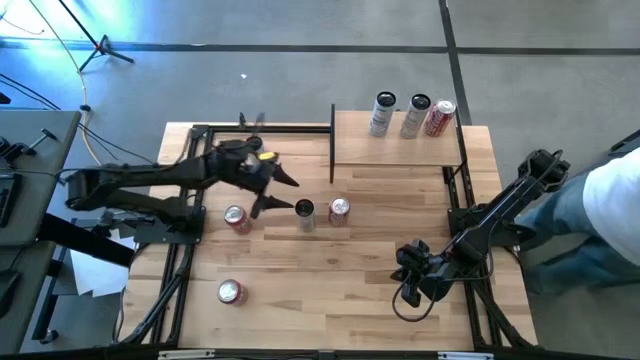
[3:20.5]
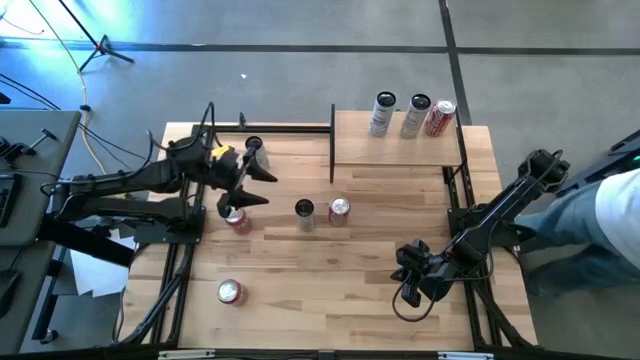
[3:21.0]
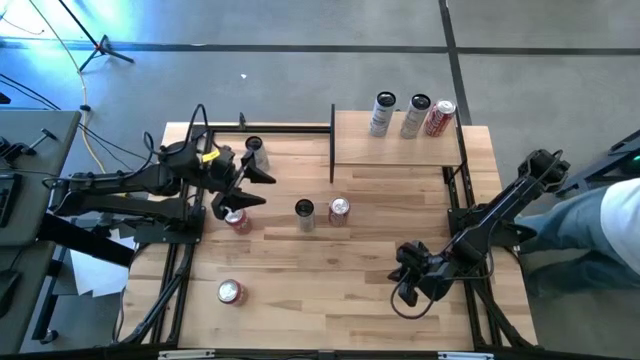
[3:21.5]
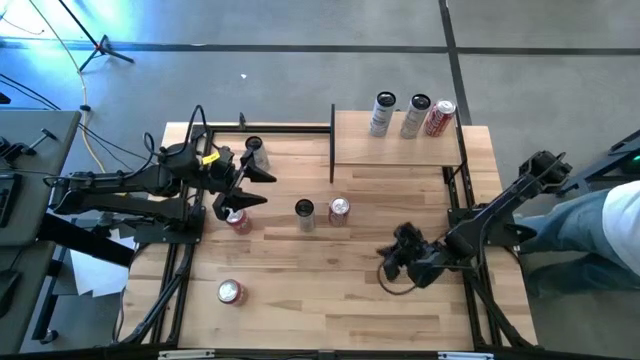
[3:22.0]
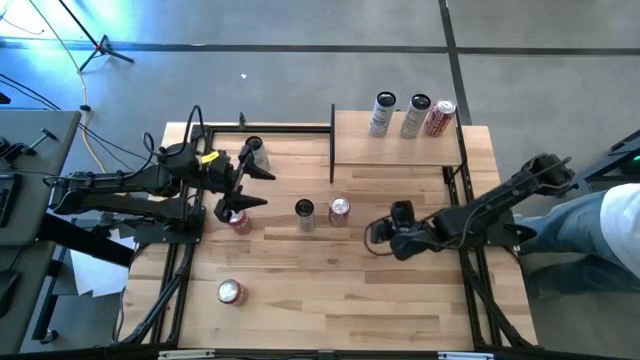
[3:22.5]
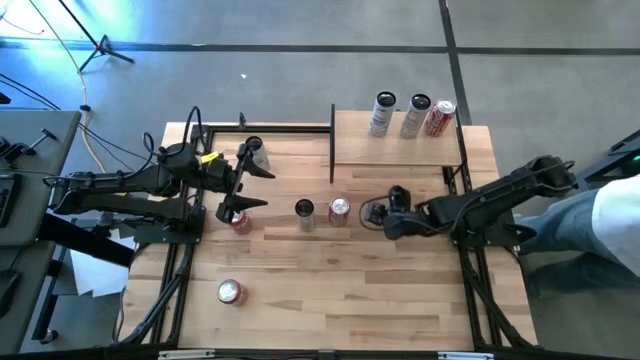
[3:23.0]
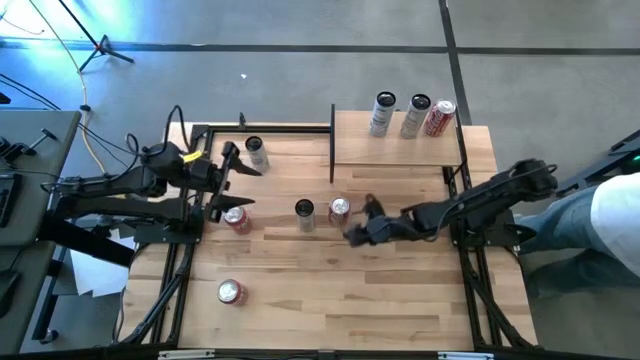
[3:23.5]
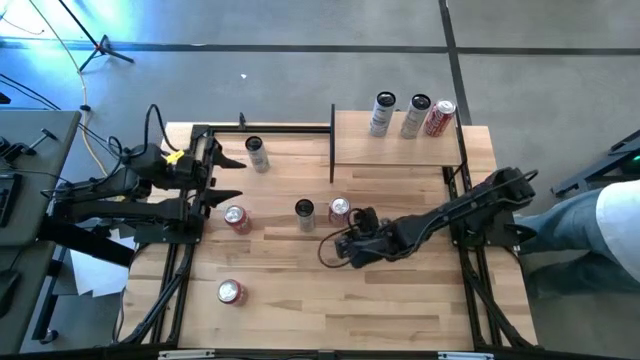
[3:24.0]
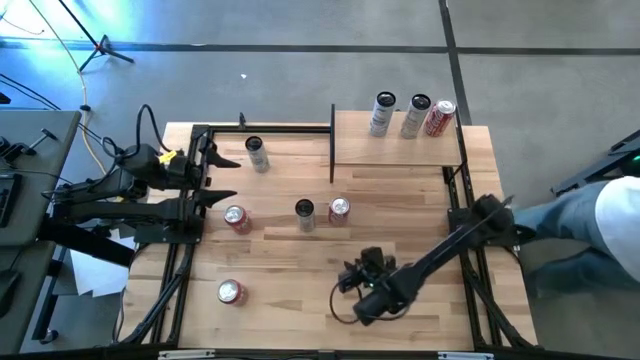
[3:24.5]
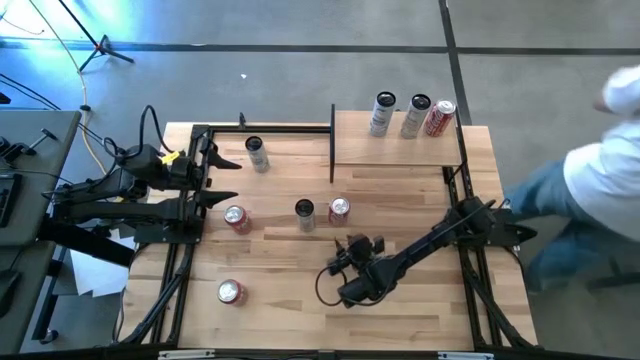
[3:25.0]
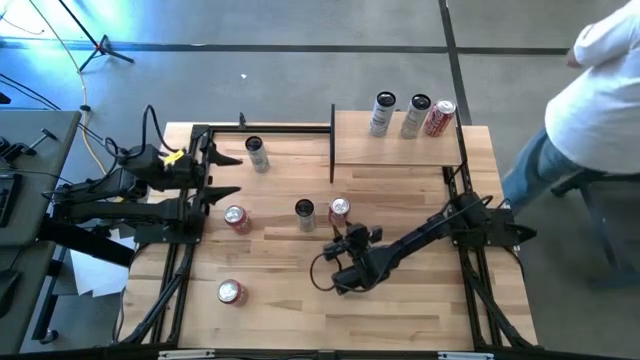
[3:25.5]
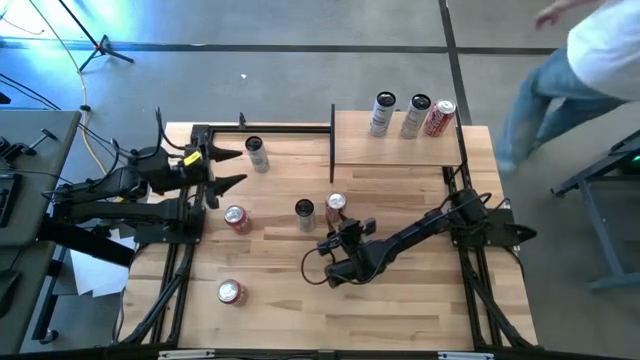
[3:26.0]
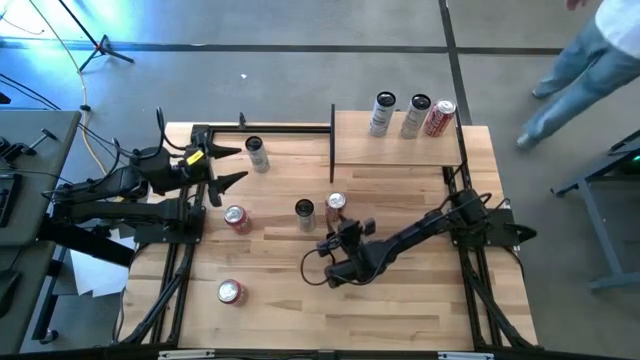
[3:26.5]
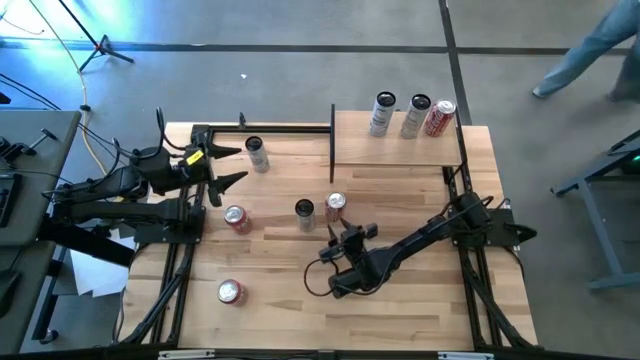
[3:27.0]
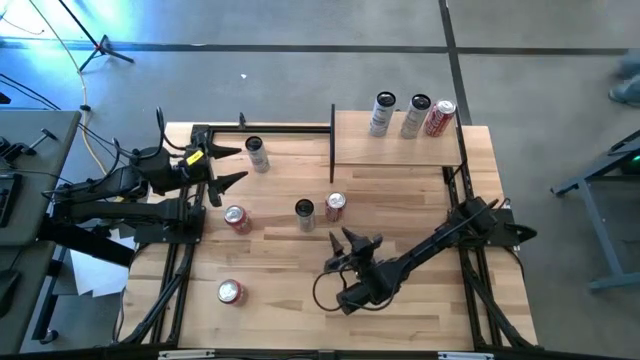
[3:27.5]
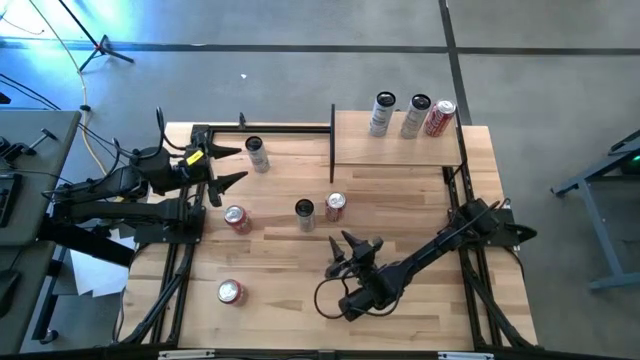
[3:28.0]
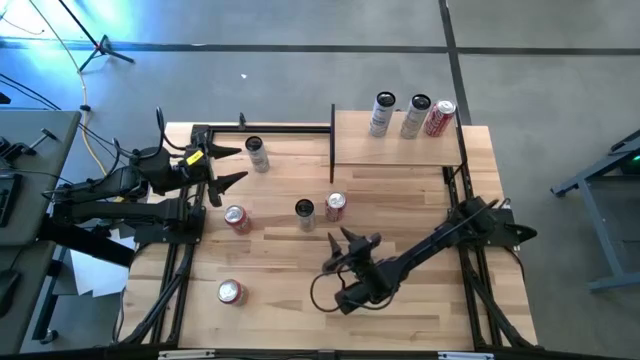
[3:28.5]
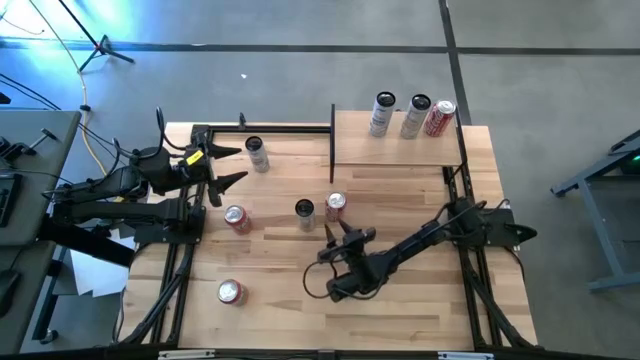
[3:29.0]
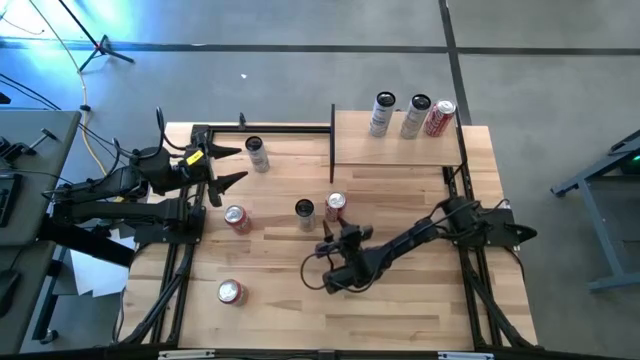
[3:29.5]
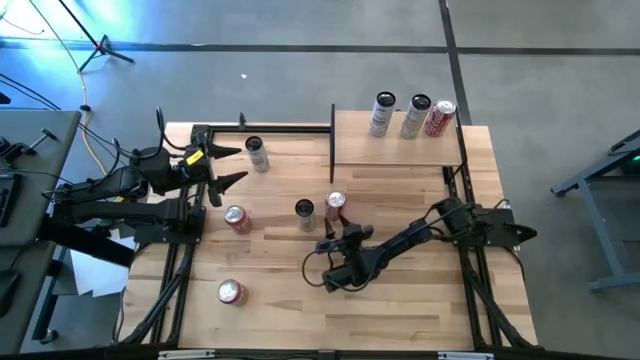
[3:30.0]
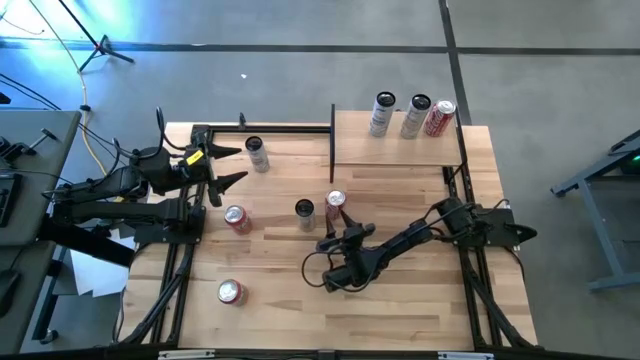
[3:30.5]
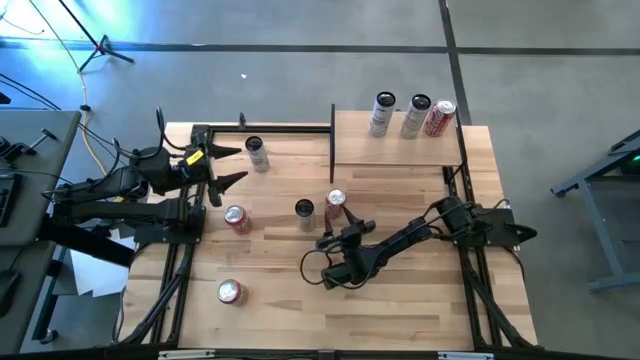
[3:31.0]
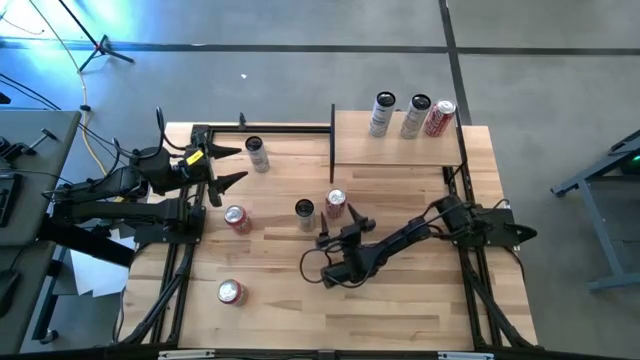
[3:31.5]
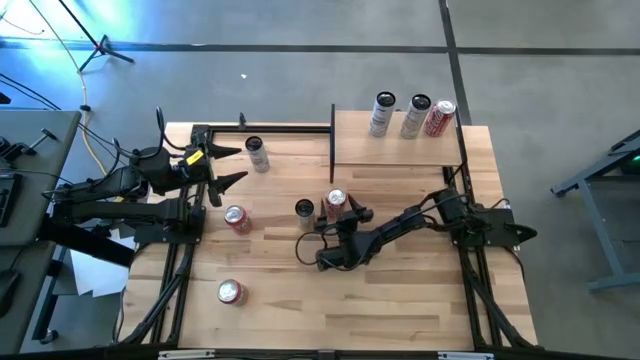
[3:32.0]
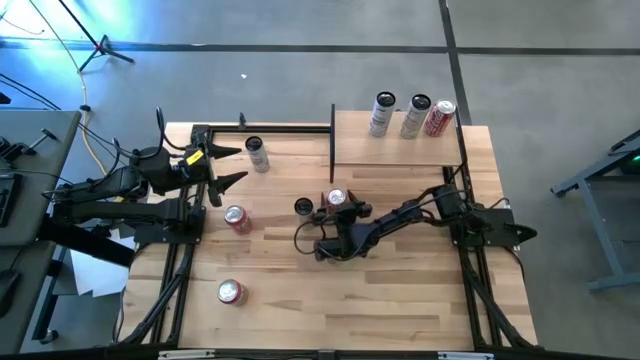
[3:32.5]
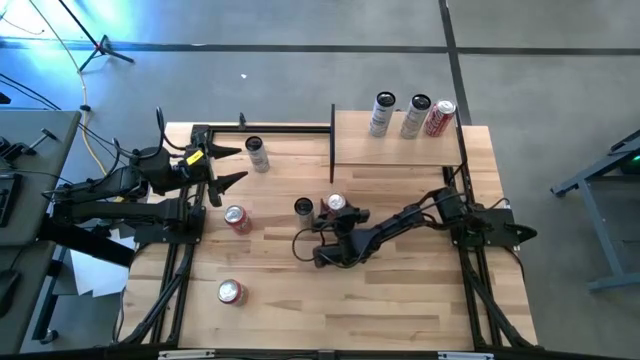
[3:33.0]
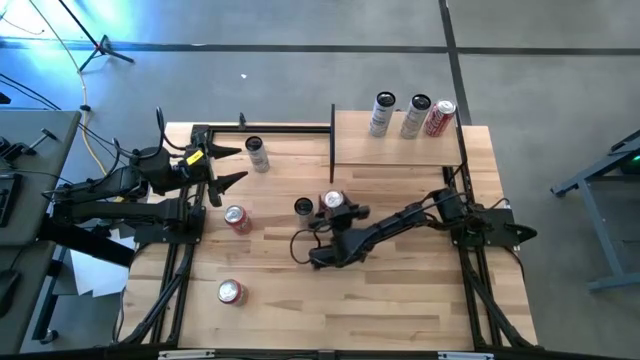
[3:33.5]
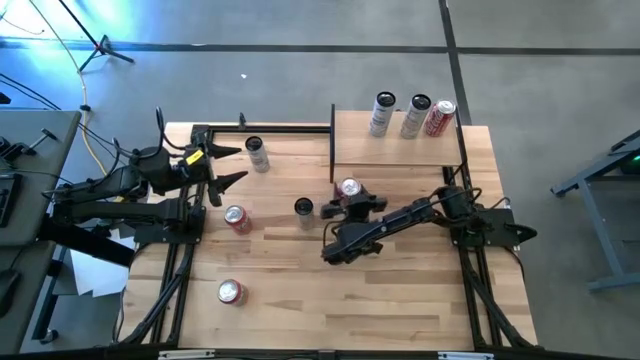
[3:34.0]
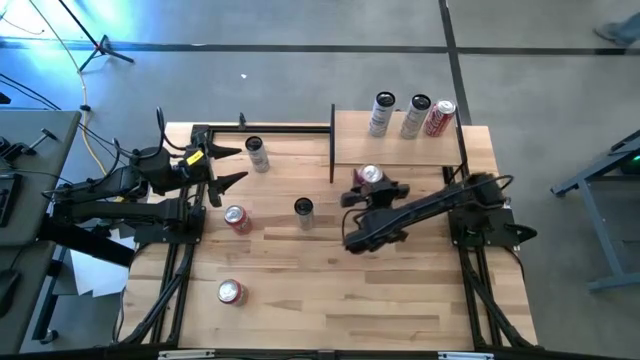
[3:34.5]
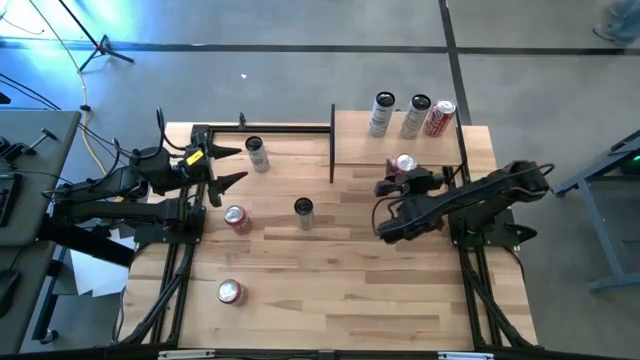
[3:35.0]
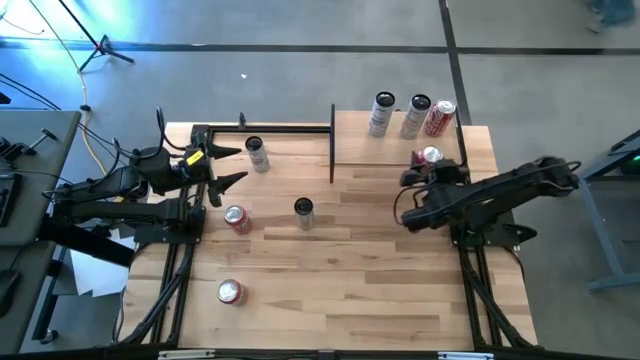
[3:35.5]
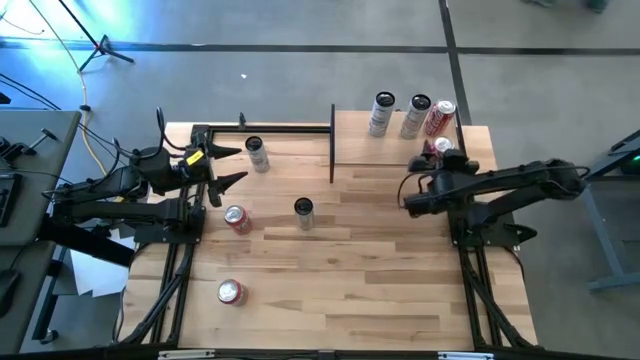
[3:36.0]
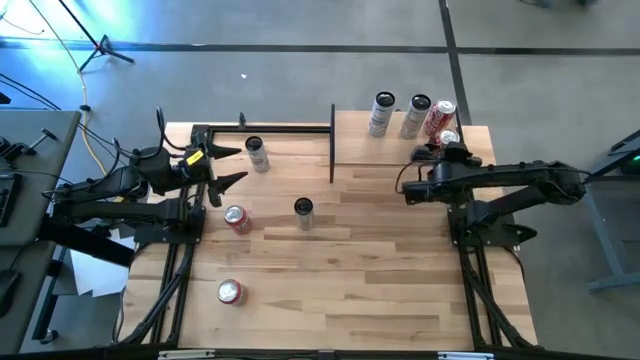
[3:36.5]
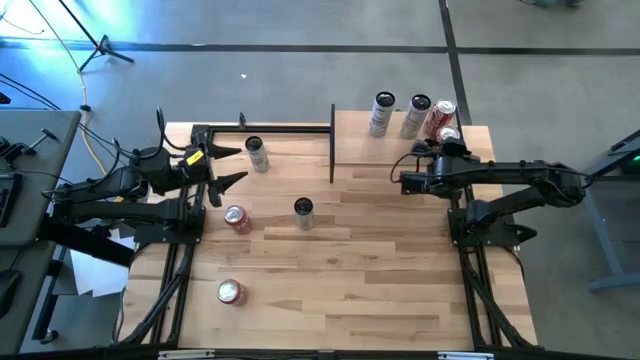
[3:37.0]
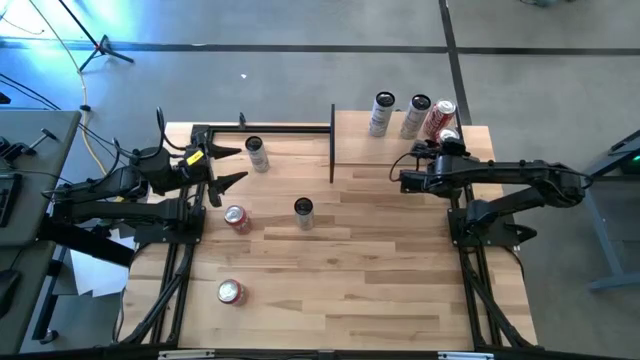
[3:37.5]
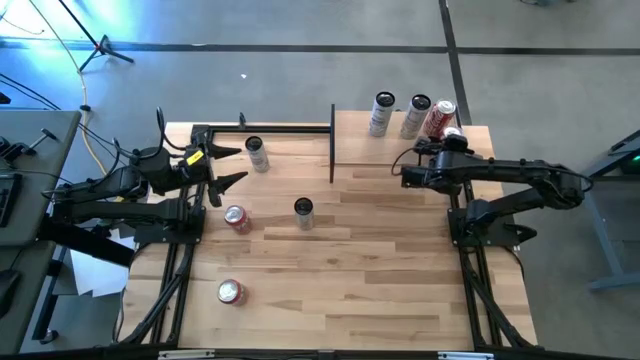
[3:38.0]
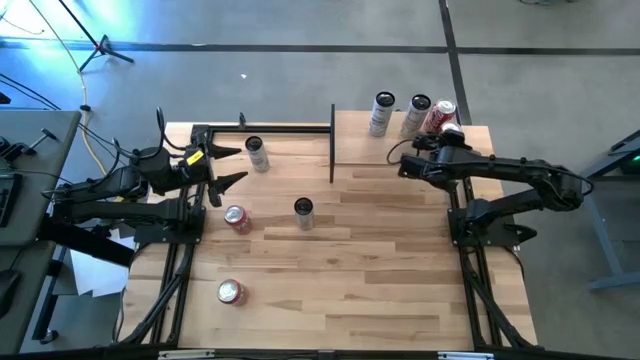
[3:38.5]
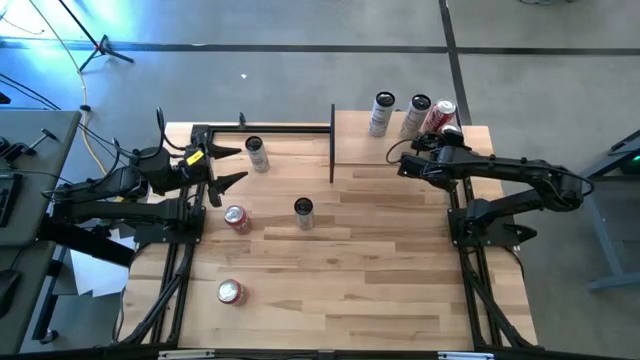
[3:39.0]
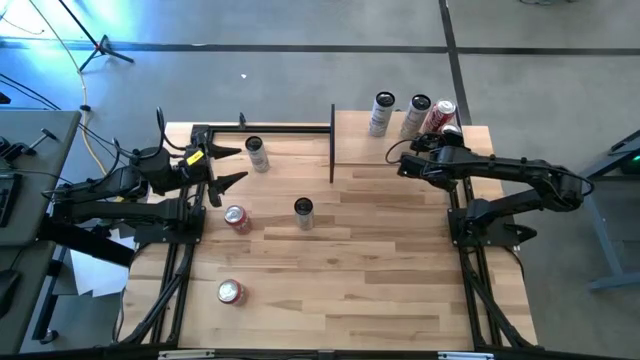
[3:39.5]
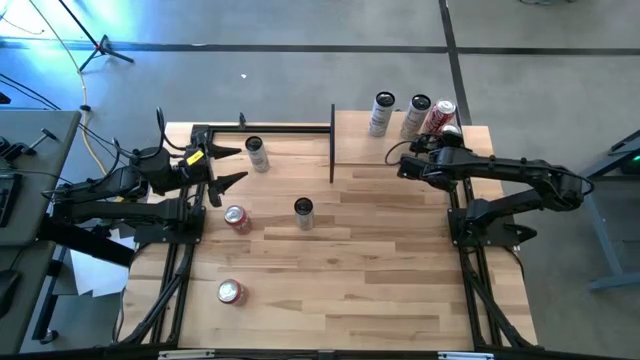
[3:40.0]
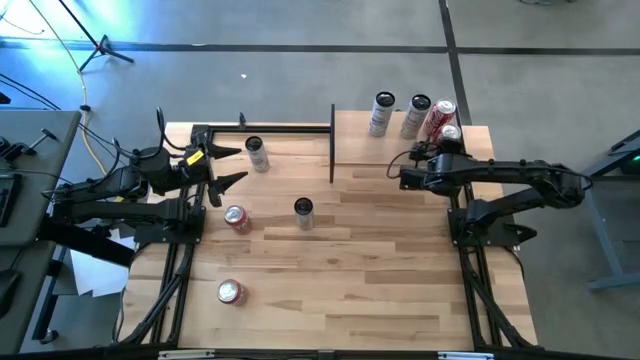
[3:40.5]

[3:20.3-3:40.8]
Task: Place canned beverage on shelf
Put the red soda can on the shelf aligned with the other red soda can

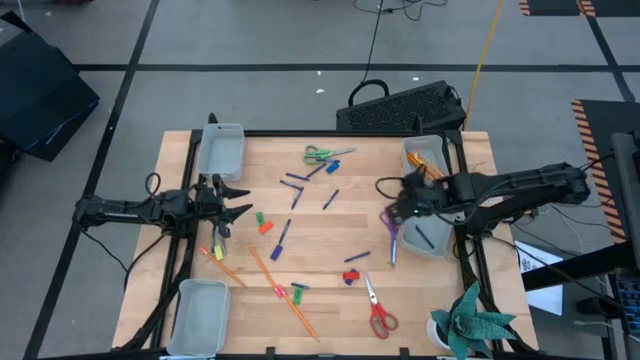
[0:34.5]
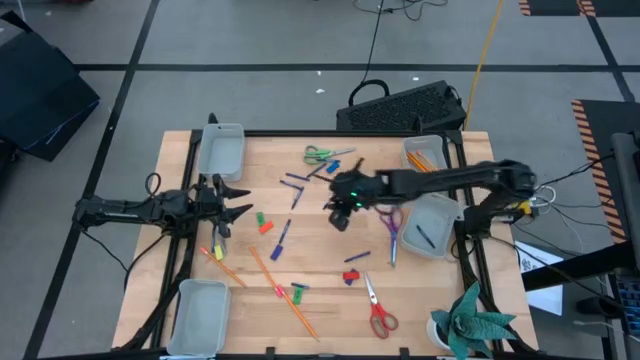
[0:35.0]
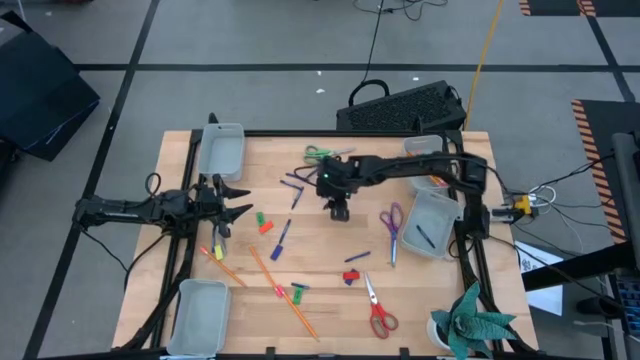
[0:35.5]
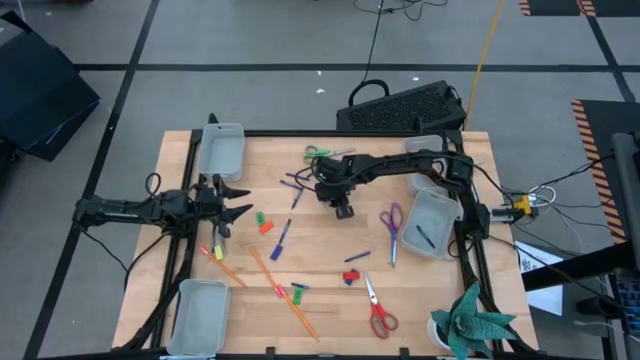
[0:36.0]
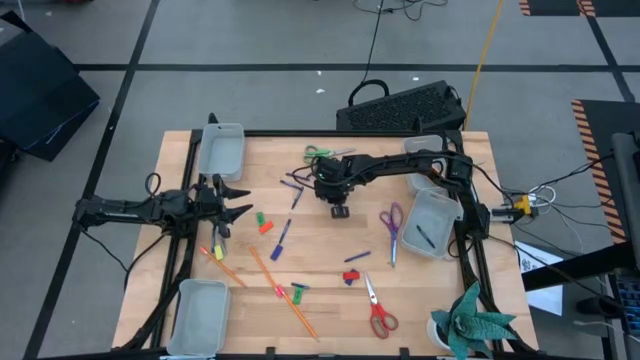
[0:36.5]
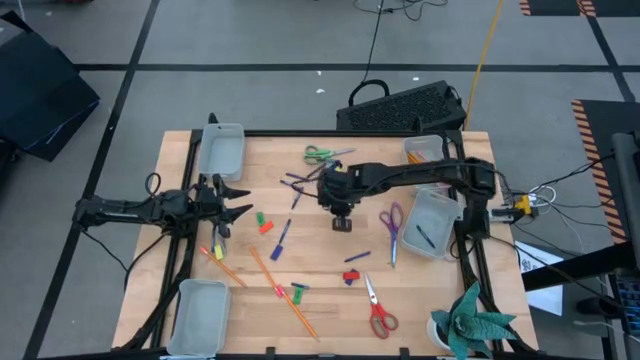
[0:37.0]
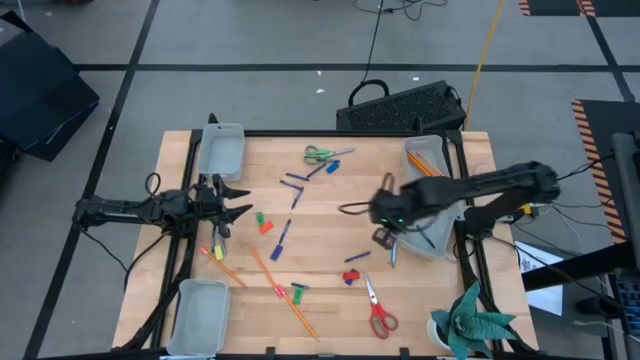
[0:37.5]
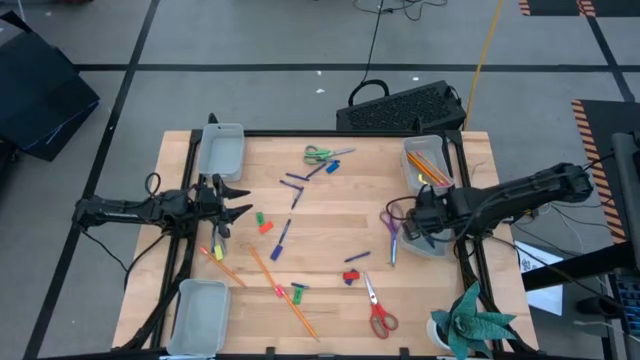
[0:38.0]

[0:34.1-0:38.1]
Task: Sort crayons/erasers/pens/pencils in bins
Put the blue crayon into the middle right gray bin
